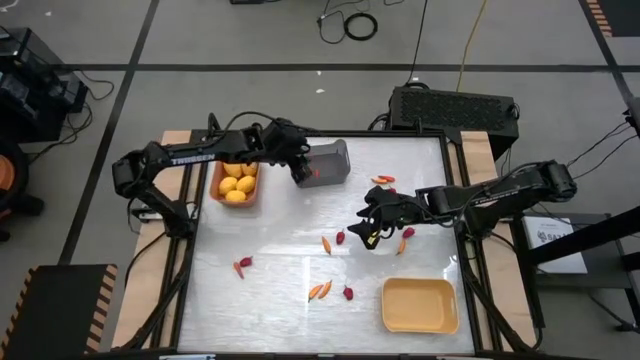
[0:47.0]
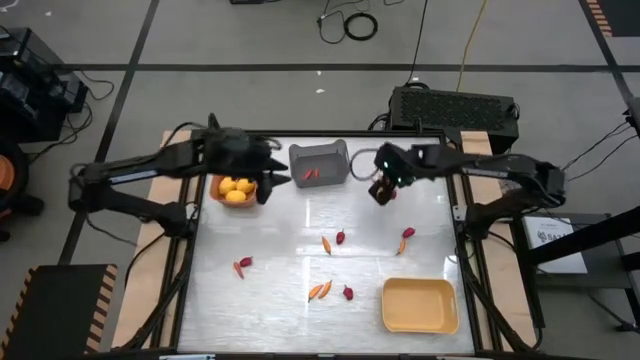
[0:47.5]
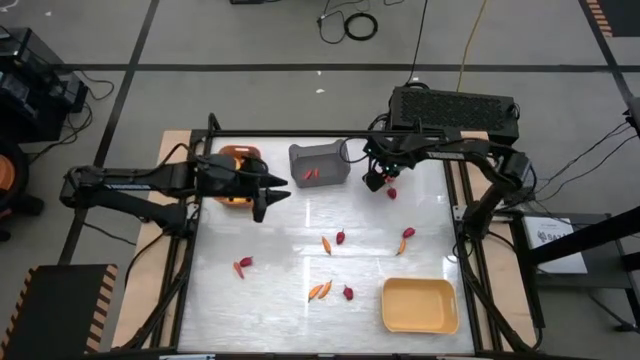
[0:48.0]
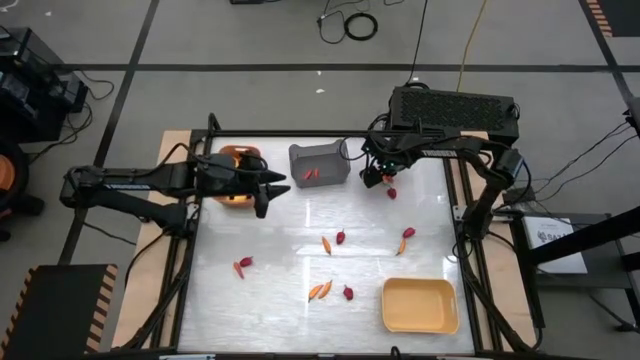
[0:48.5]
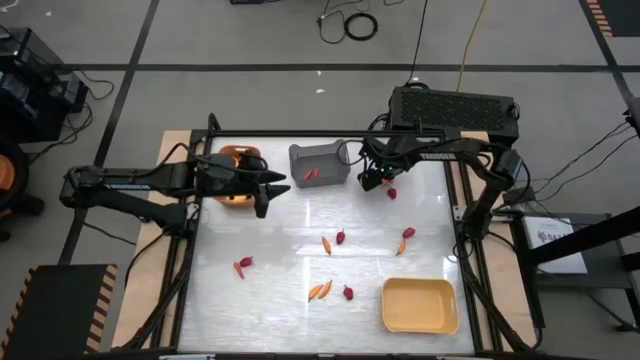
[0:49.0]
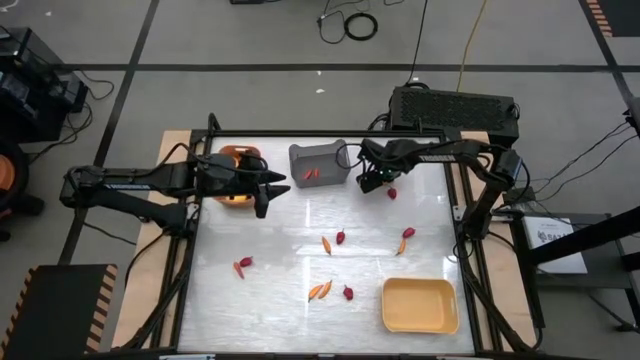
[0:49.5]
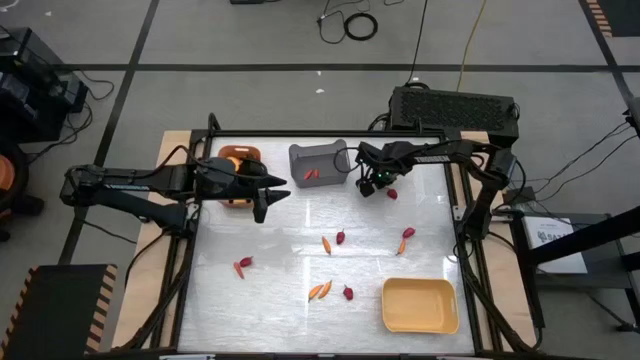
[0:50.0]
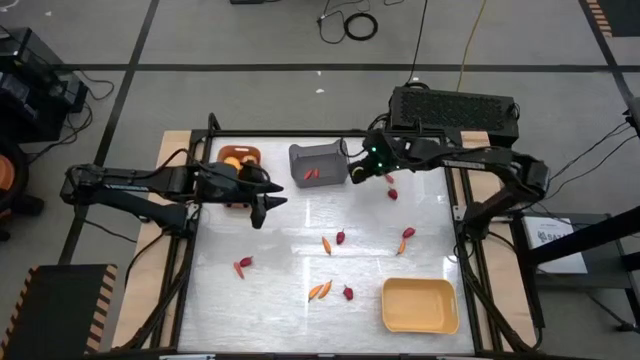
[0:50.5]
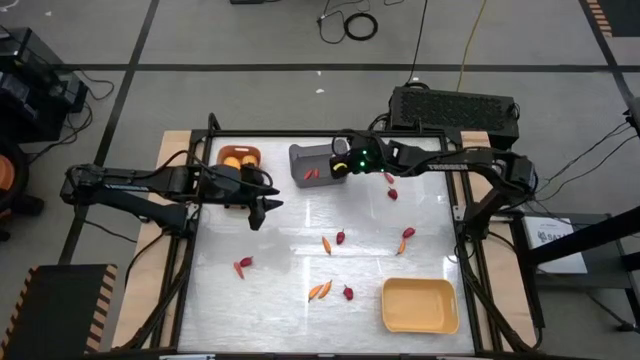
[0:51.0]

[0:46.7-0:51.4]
Task: Sort produce into baskets
Put the yellow chili pepper into the black bin

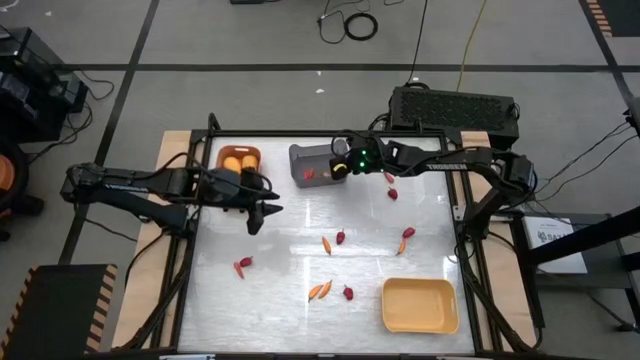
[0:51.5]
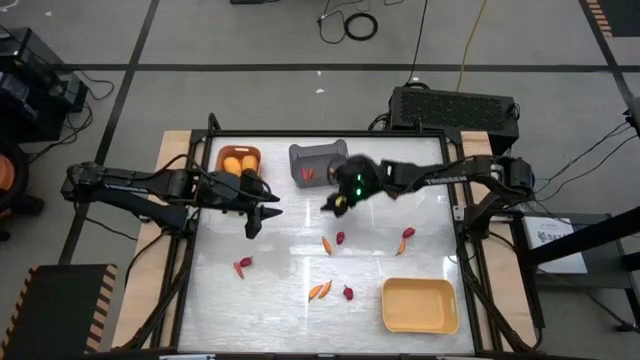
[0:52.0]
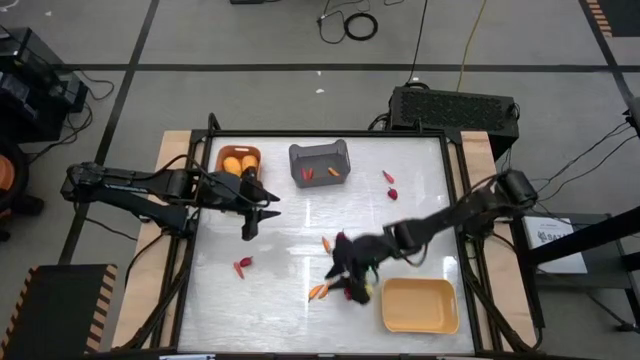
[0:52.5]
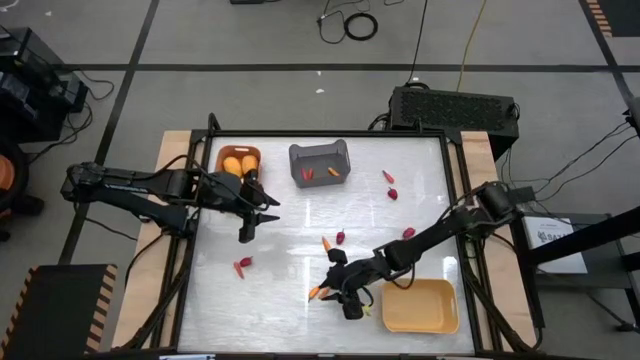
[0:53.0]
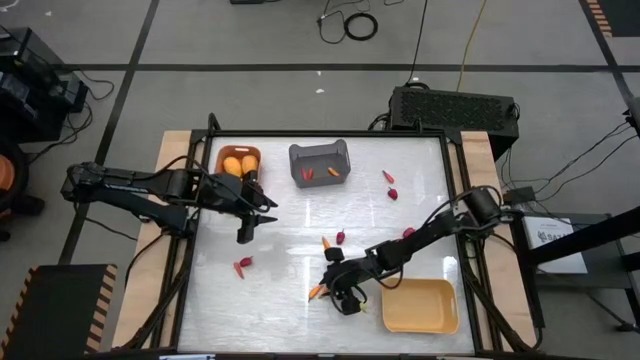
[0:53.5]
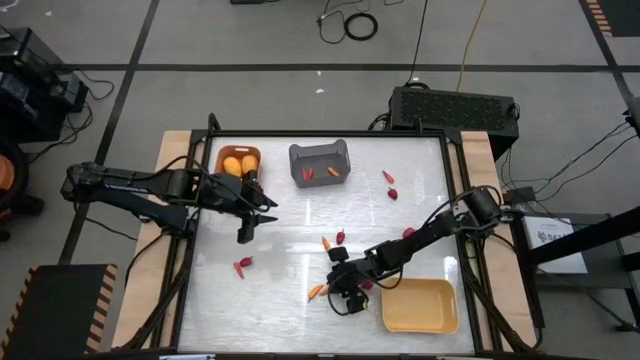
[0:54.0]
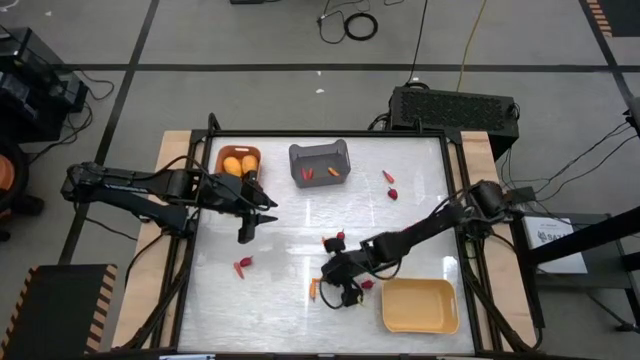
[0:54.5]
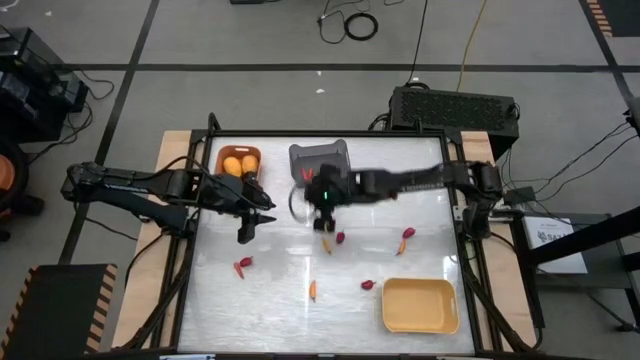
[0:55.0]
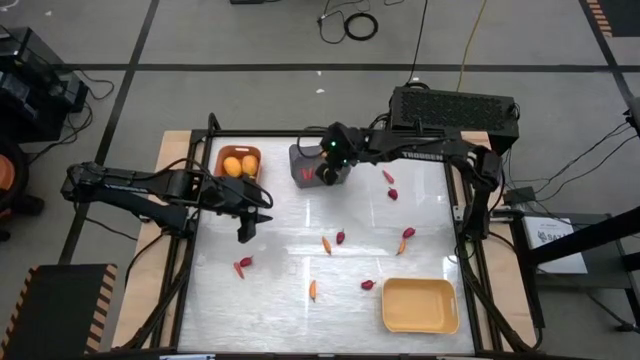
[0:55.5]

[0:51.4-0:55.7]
Put the yellow chili pepper into the black bin

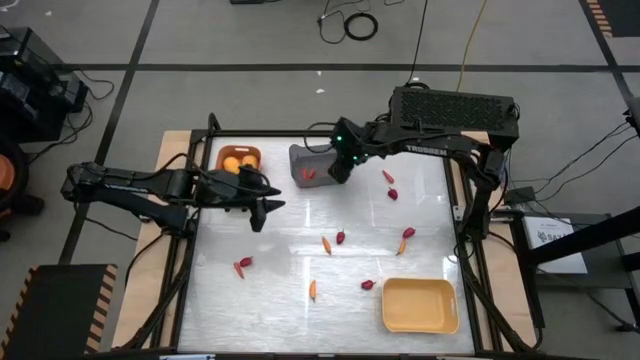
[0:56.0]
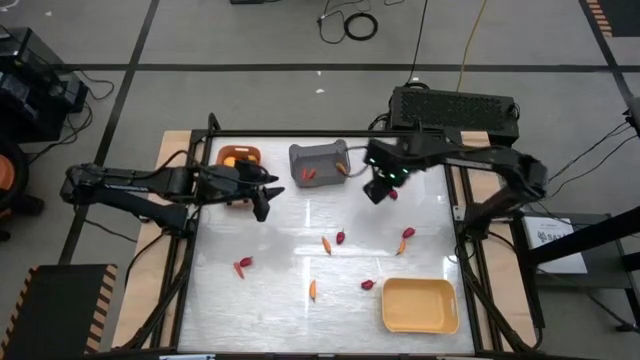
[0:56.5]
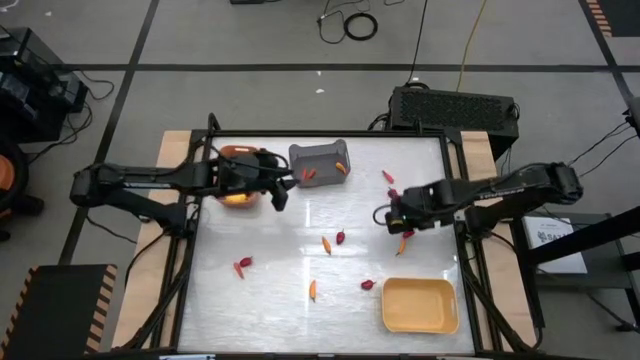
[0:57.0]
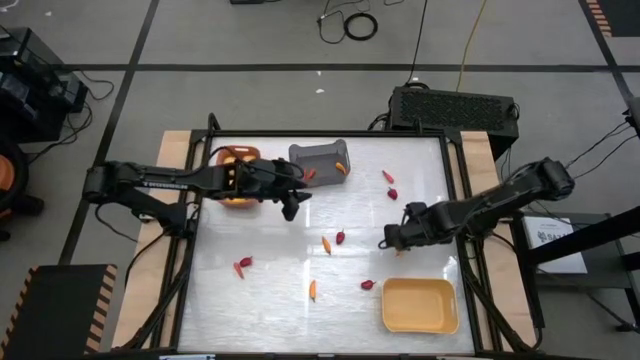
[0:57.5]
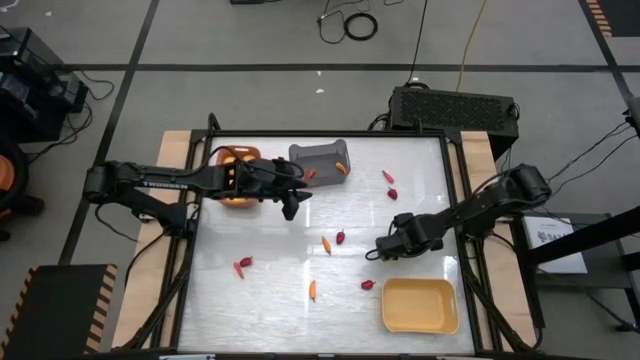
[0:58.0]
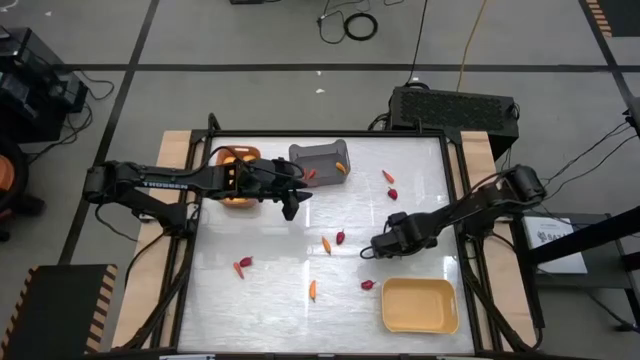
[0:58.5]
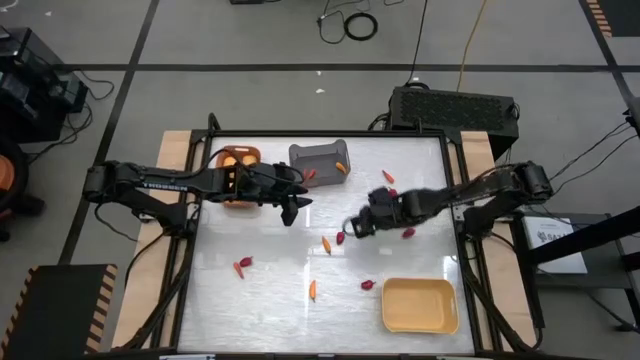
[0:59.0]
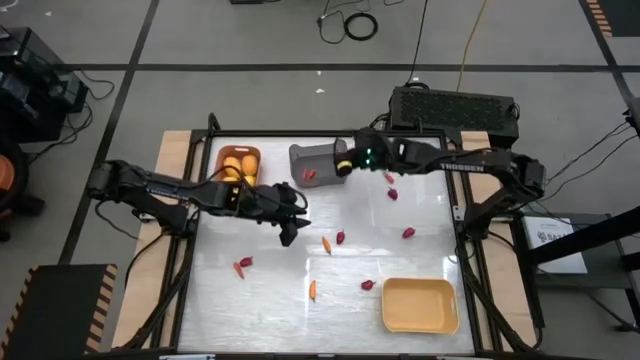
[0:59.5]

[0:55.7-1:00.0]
Put the yellow chili pepper into the black bin

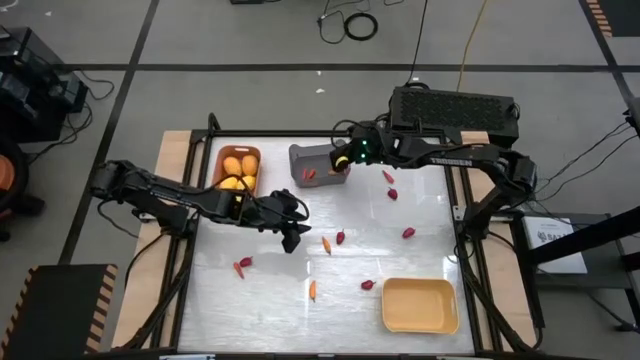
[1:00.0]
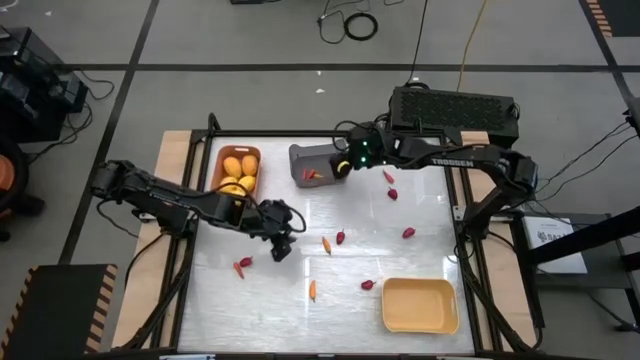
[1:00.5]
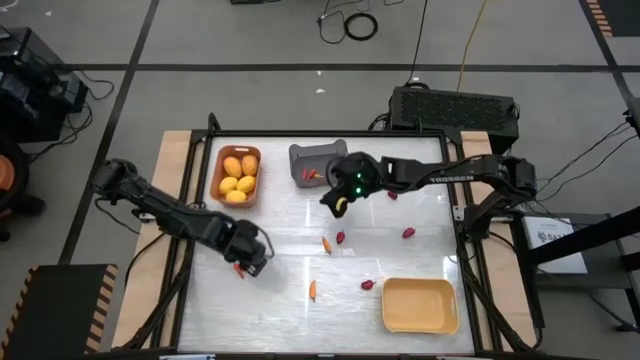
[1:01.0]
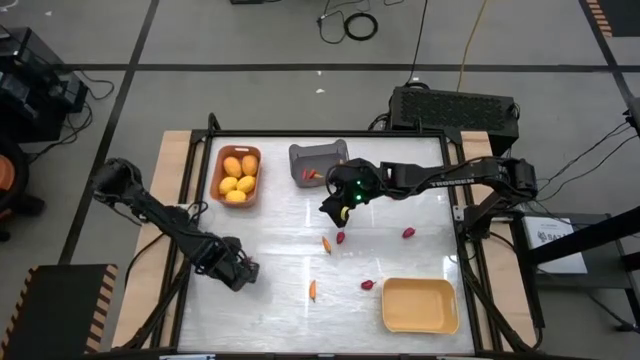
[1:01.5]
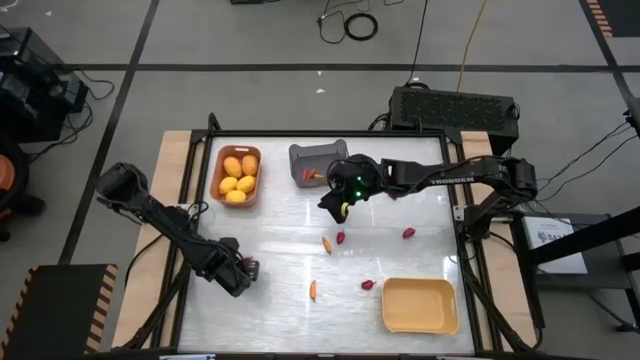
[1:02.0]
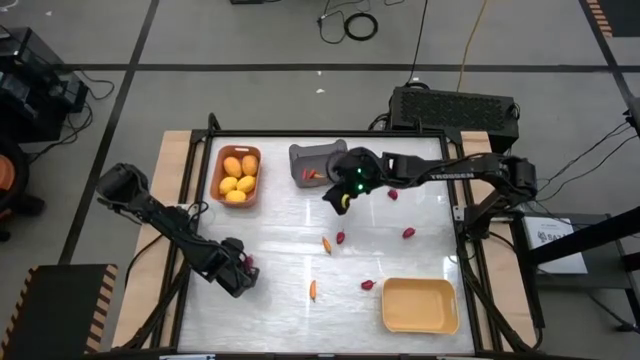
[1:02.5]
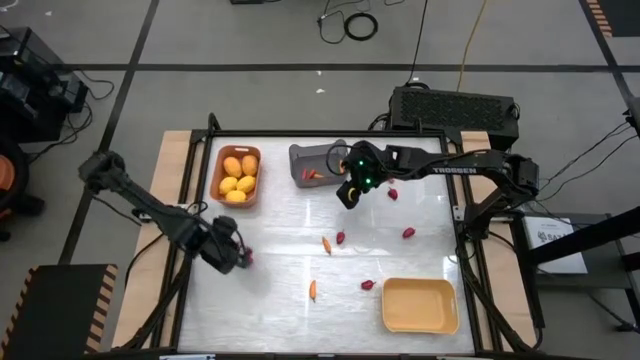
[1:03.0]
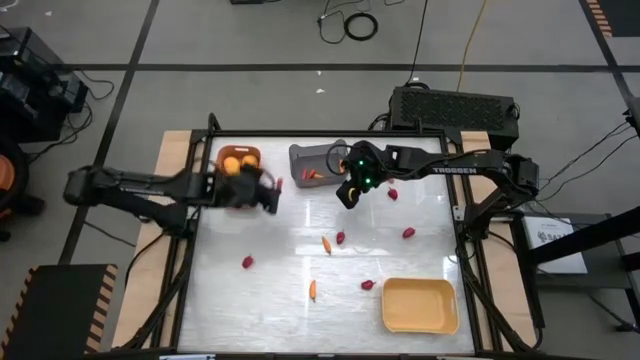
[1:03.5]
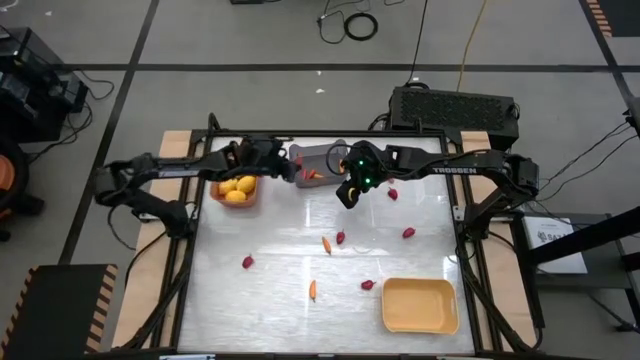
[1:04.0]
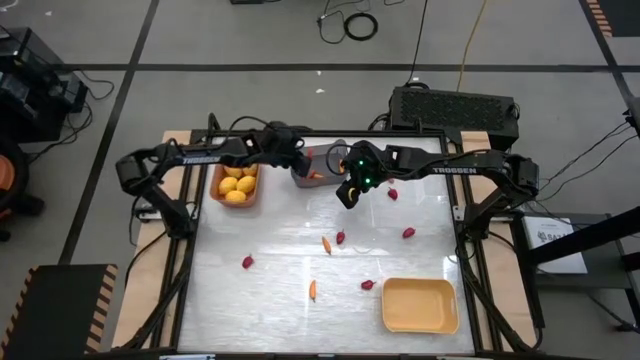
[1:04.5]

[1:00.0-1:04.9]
Put the orange chili pepper into the black bin

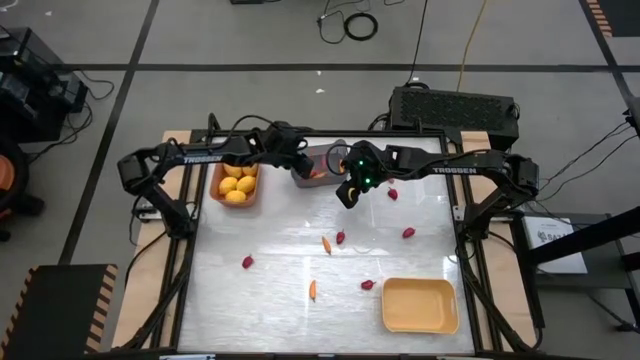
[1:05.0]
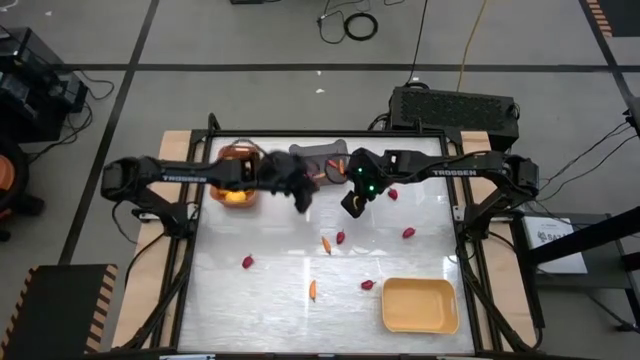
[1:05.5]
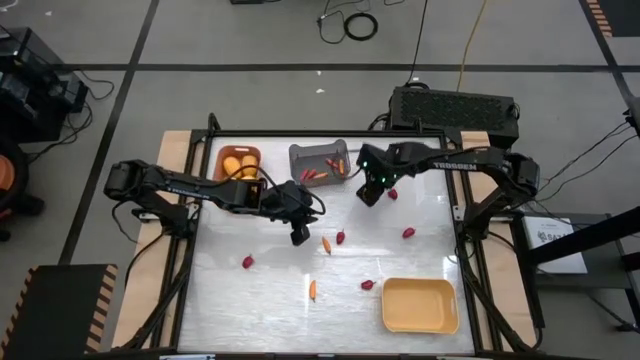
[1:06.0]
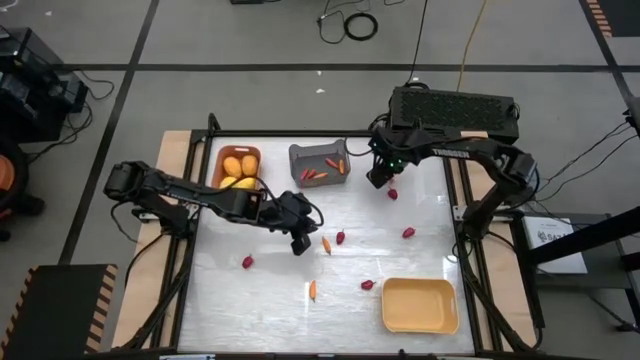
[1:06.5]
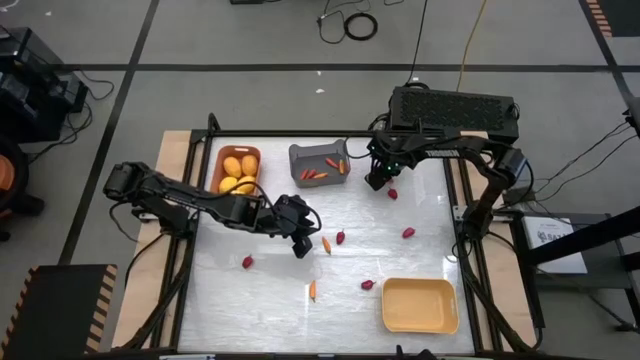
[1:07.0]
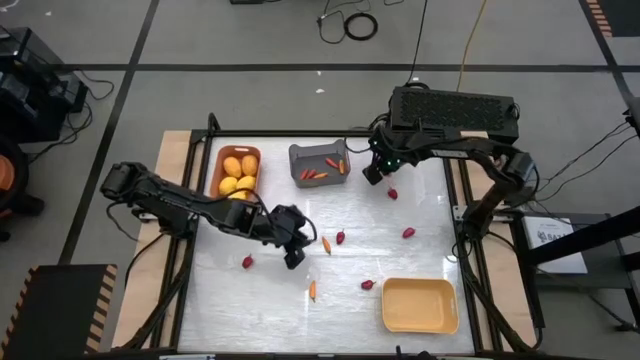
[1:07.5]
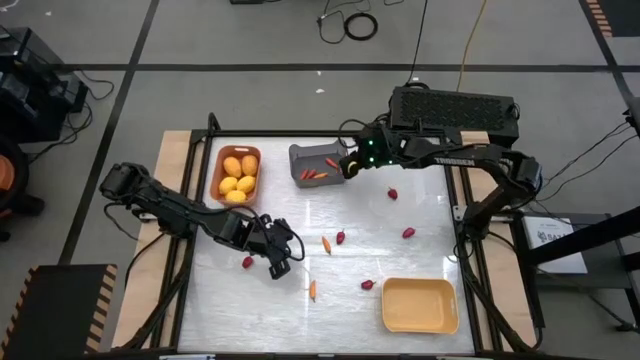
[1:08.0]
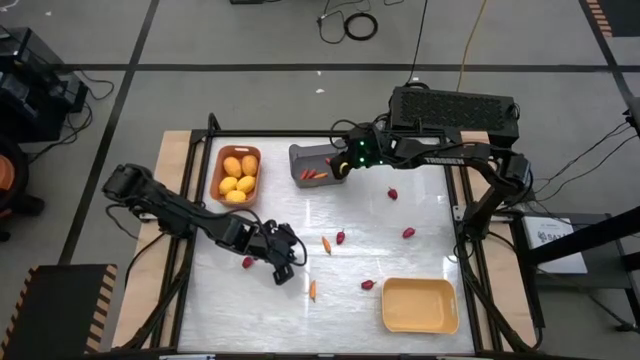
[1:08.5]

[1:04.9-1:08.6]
Put the orange chili pepper into the black bin

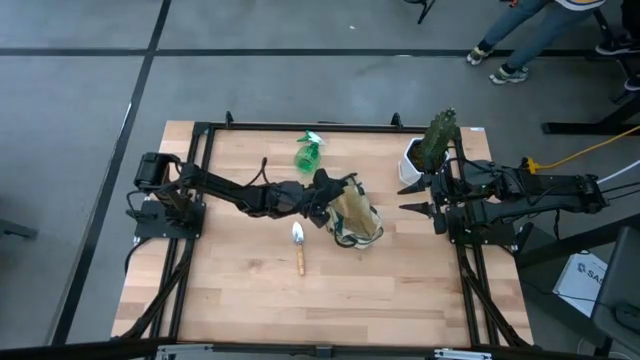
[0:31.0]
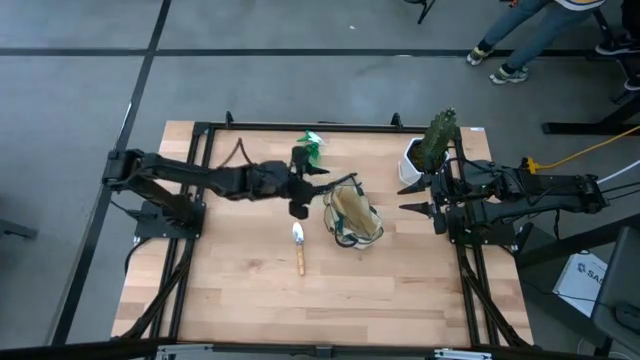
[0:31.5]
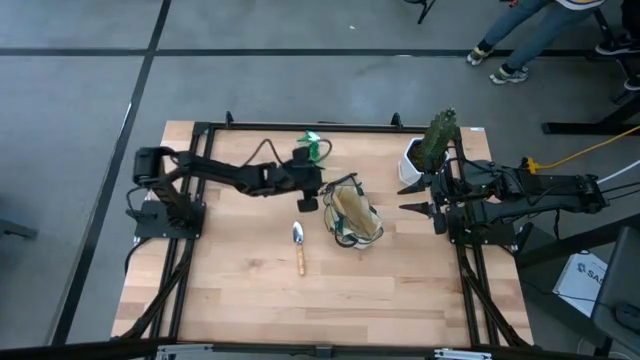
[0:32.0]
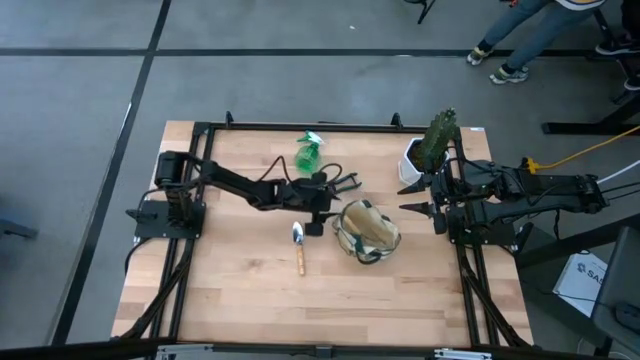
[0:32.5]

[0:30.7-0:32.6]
Task: Pick & Place Garden tools in Gardening bag
Adjust the light brown gardening bag on the table
